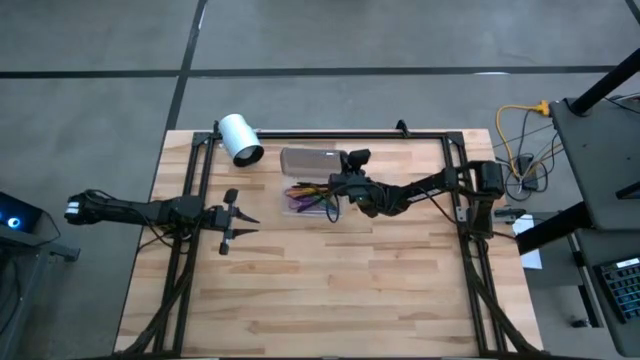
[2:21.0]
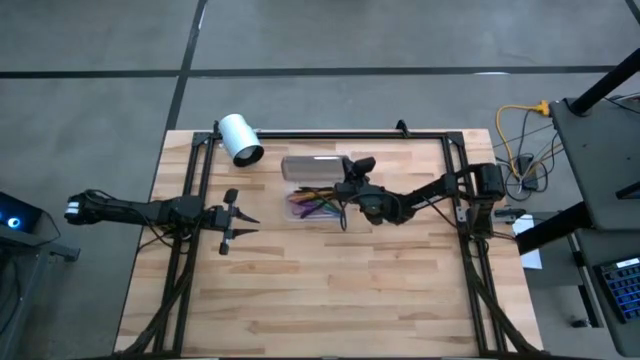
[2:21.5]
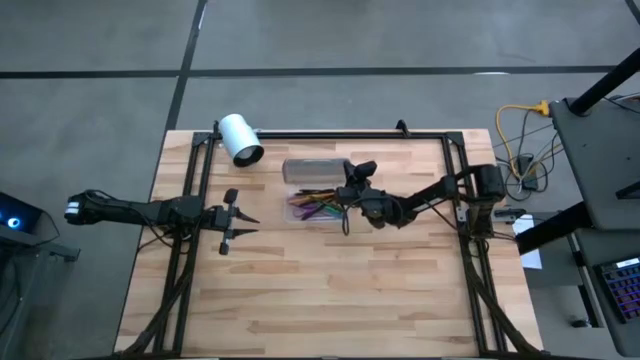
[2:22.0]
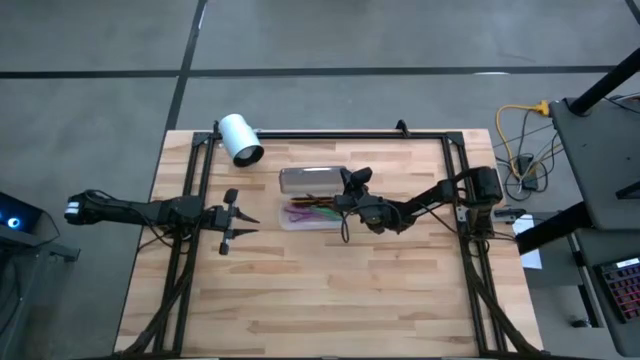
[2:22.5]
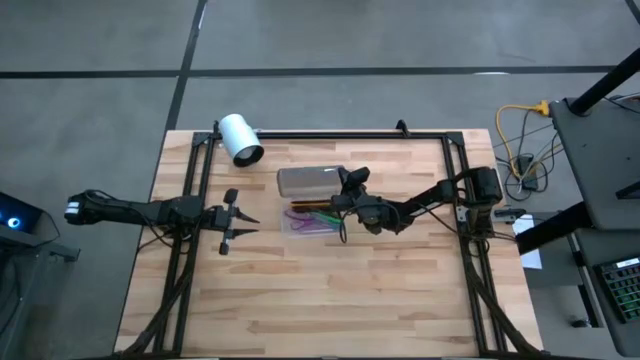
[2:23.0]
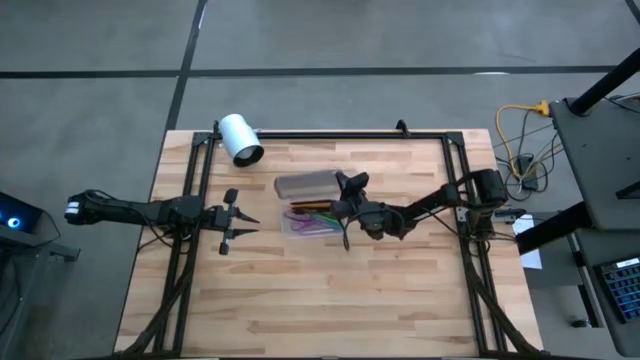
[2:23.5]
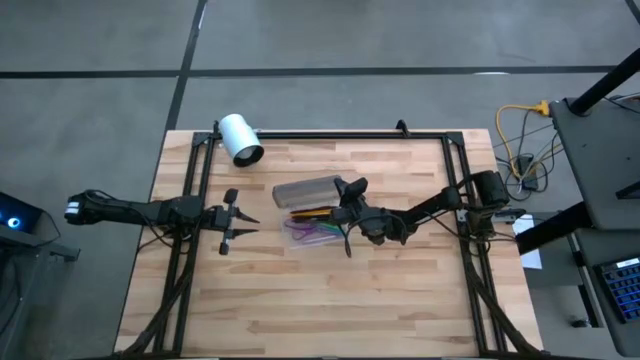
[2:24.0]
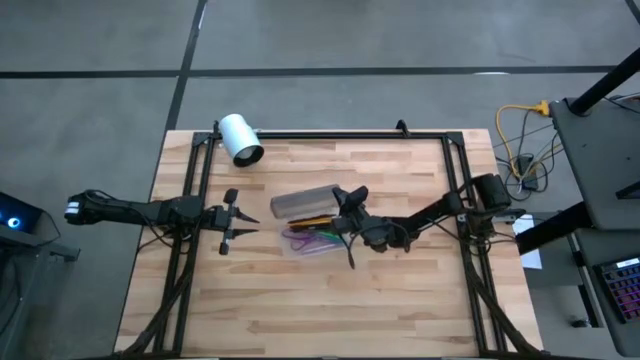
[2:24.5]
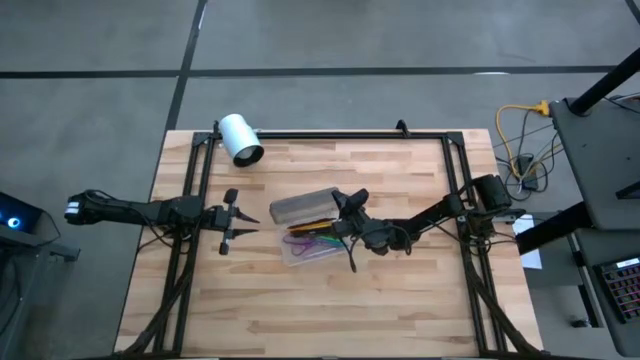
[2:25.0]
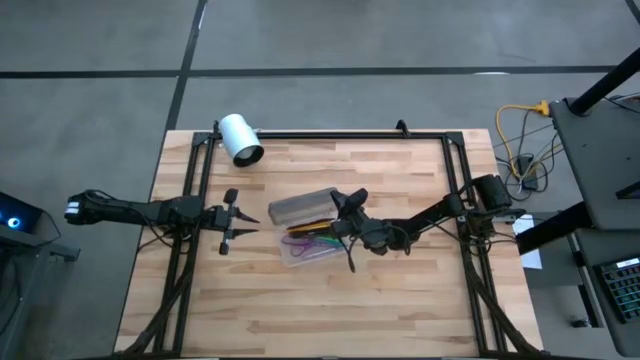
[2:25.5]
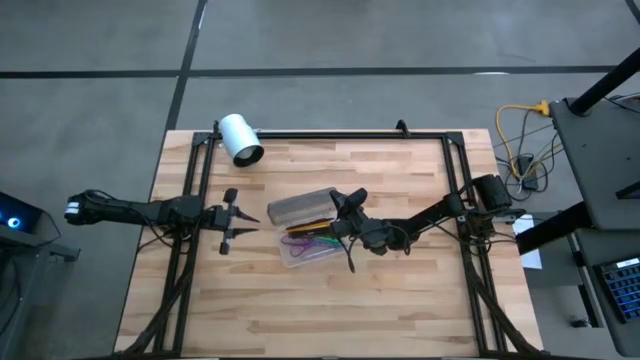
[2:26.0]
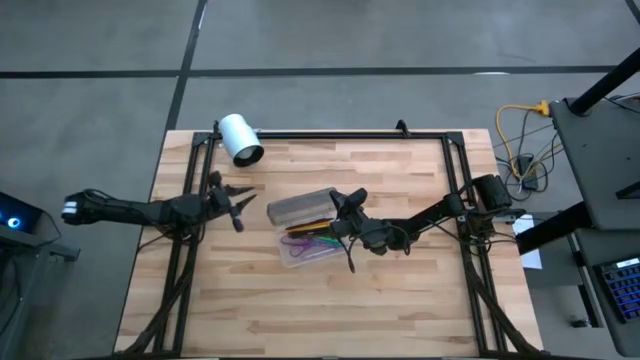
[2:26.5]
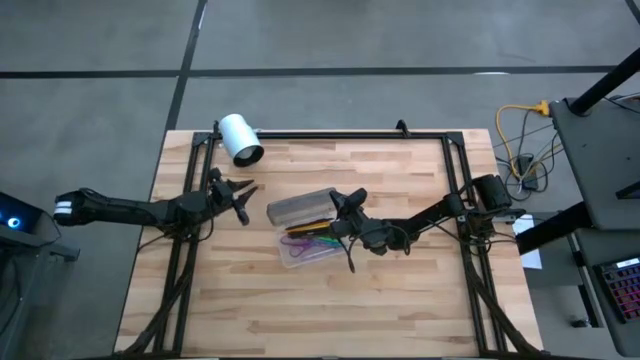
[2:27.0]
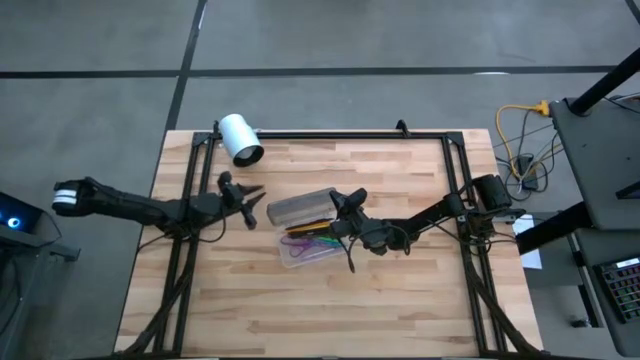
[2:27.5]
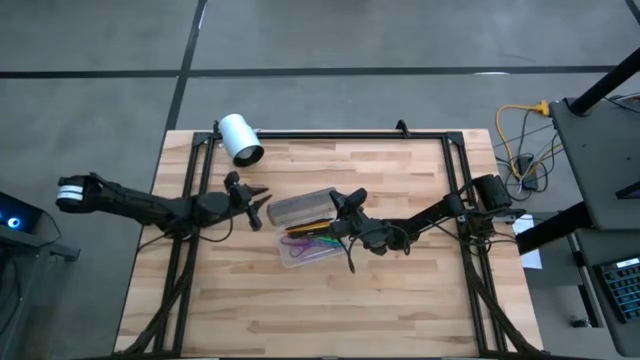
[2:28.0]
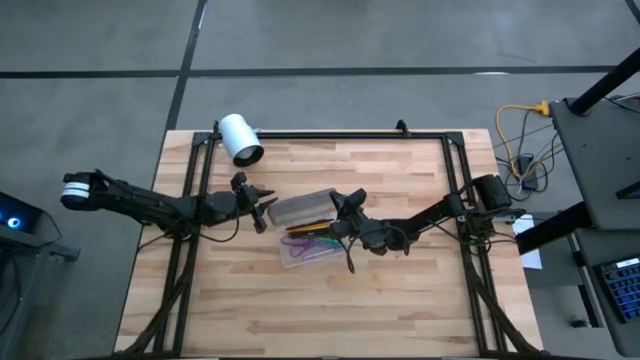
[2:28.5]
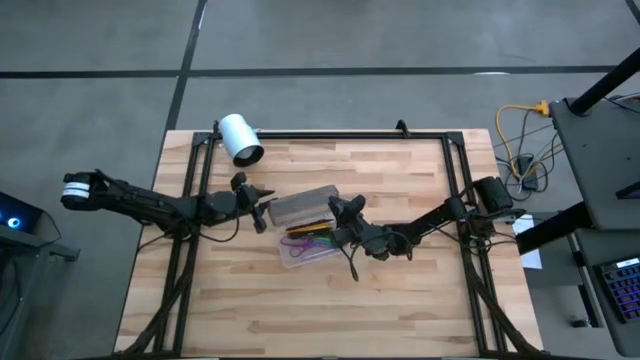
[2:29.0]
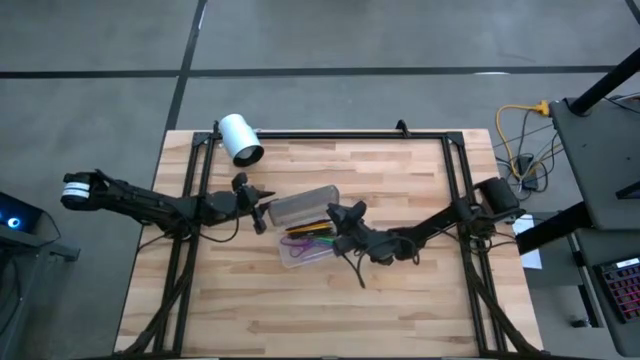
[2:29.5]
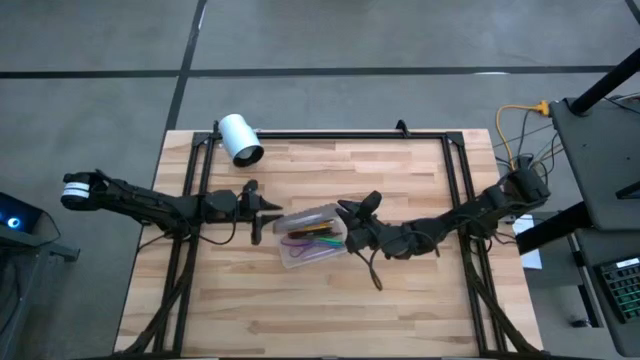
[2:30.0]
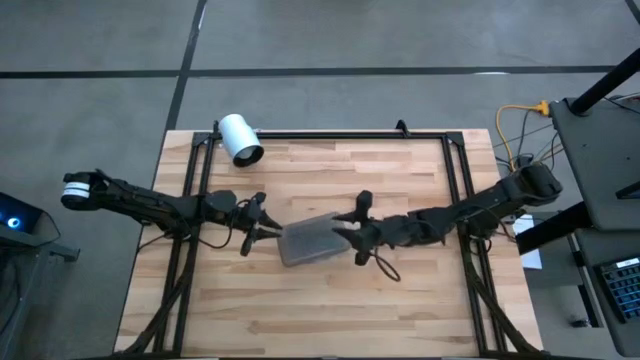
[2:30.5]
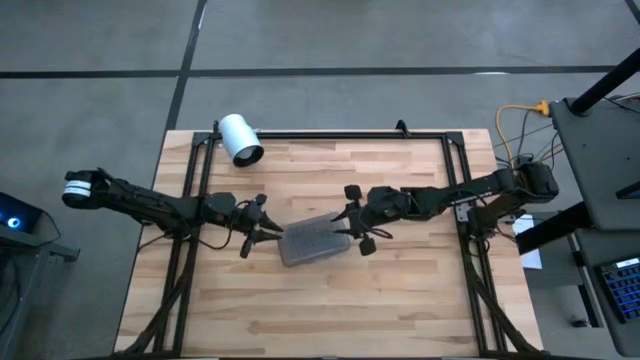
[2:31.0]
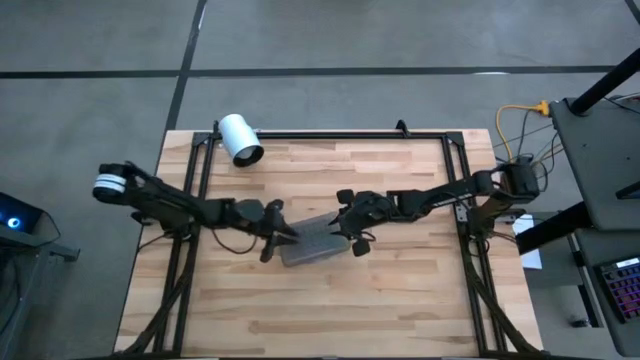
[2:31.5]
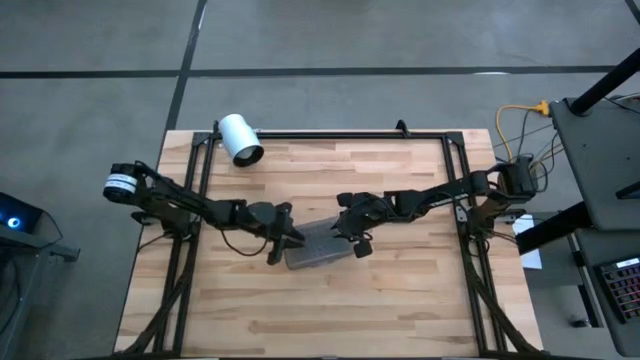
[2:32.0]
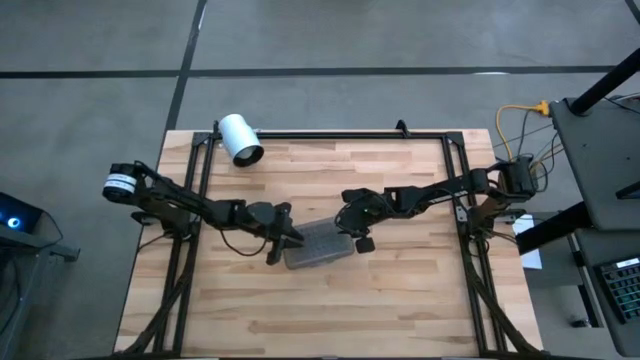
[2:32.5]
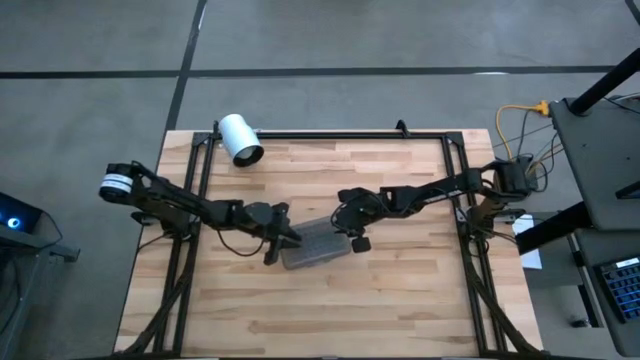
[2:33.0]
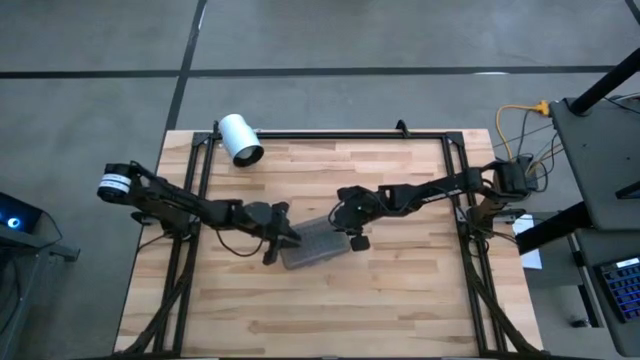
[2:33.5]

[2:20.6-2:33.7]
Task: Pick & place school supplies into a supply box
Close the supply box

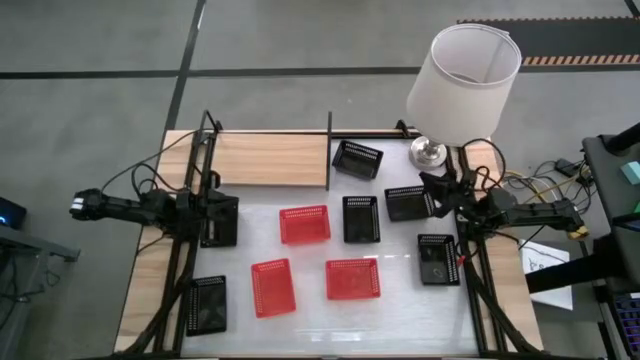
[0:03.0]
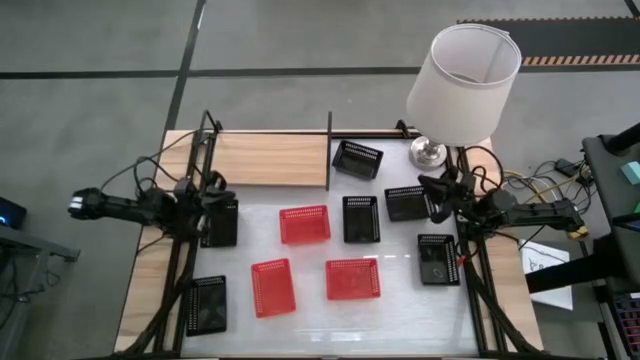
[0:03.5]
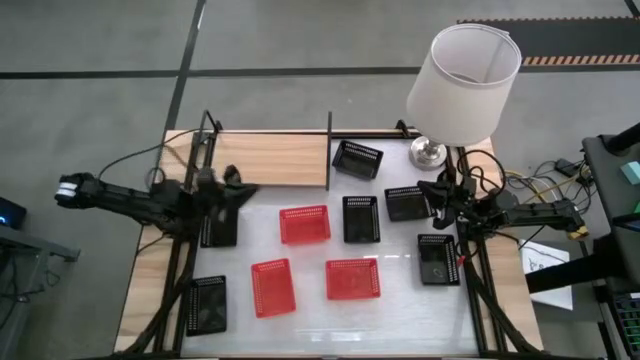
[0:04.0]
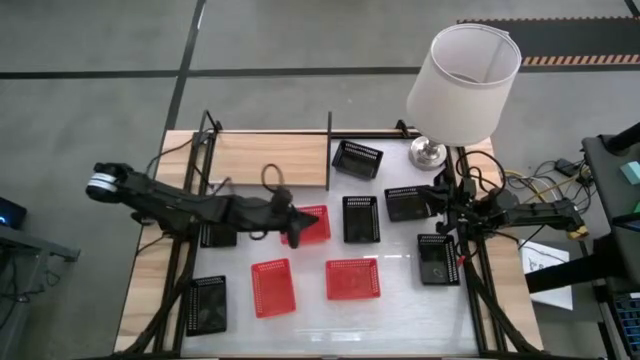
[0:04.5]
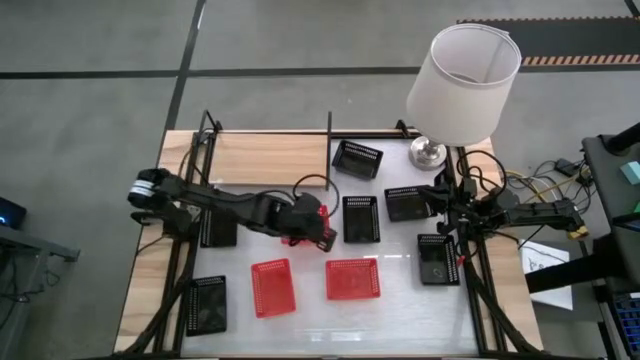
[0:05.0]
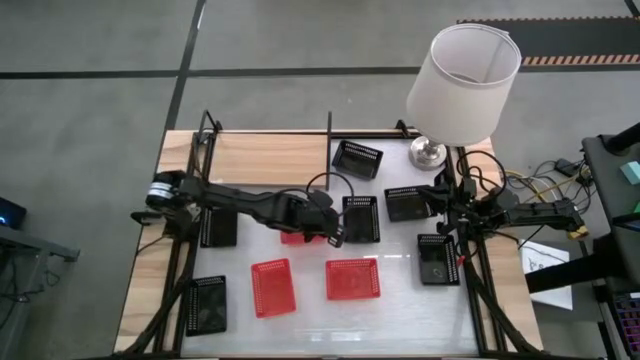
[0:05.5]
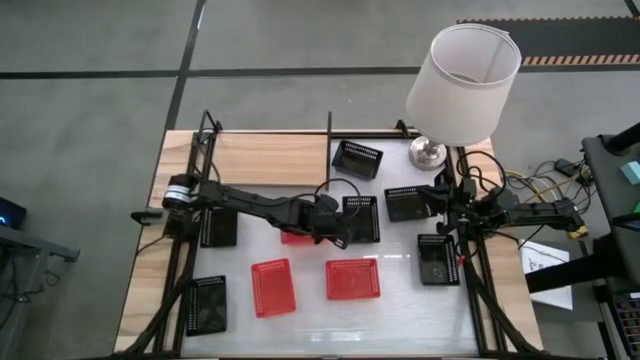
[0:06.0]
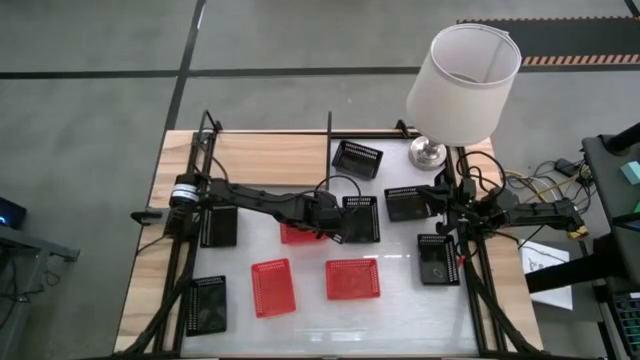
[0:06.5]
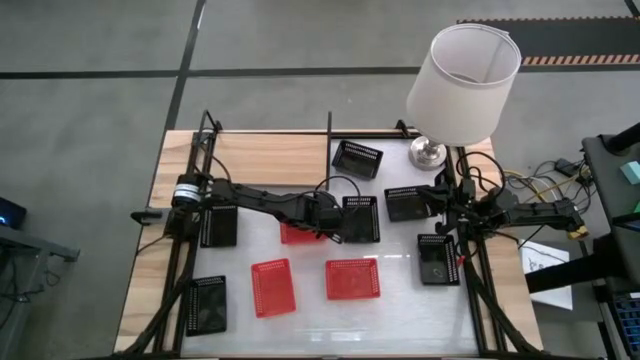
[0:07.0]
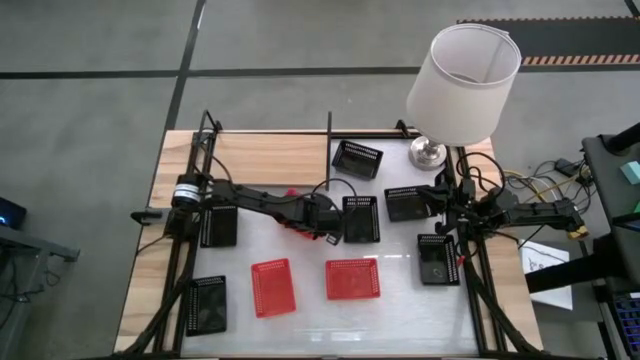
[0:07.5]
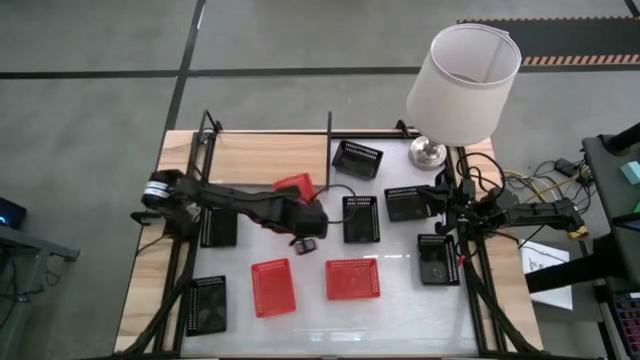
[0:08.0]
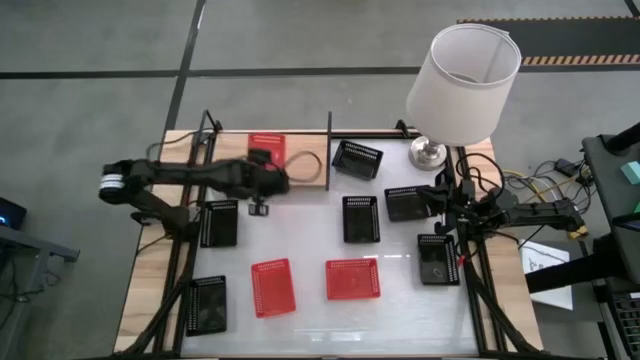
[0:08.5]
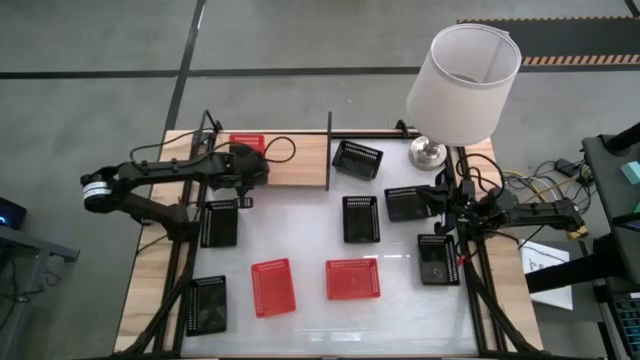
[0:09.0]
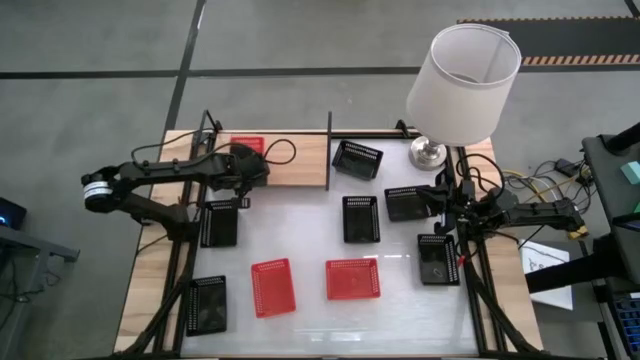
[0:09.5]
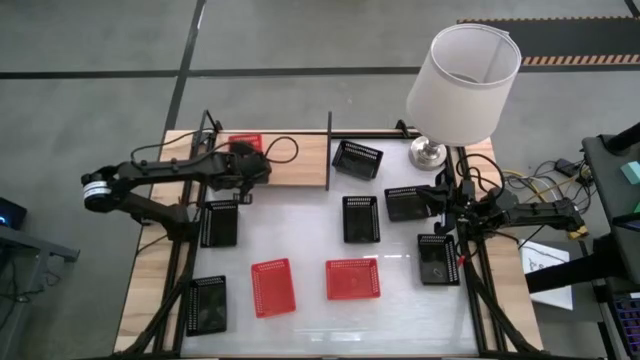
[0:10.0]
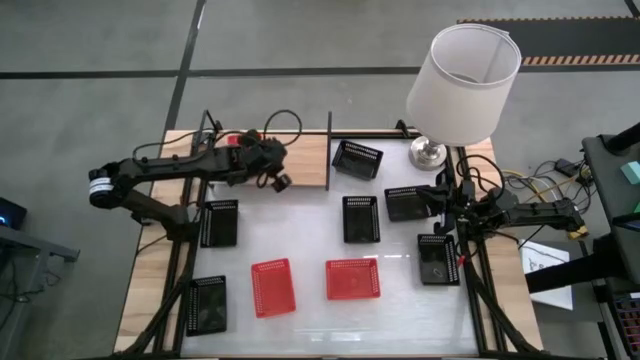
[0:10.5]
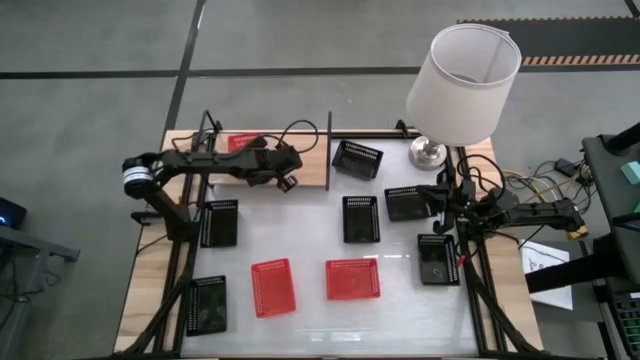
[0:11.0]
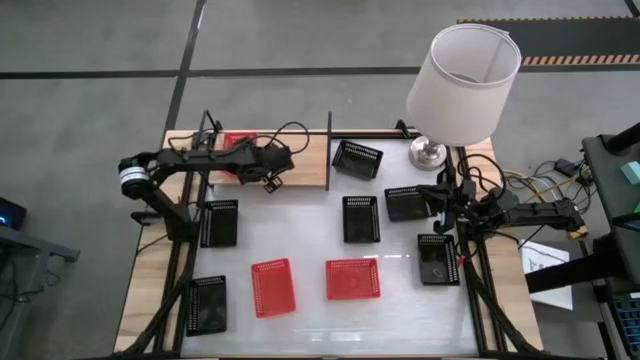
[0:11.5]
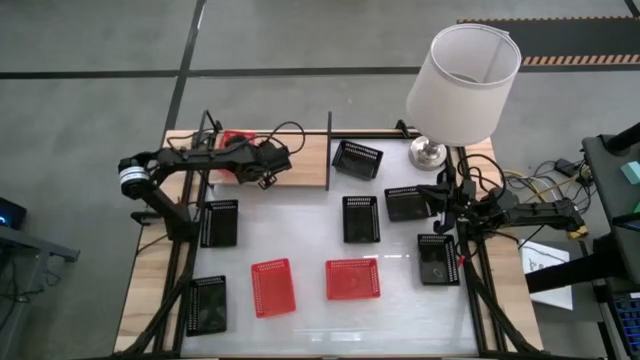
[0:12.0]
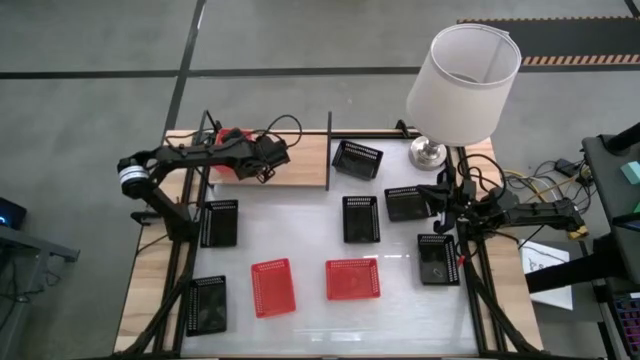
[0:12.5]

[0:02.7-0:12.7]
Task: Stack baskets on shelf by color
Put the red basket on the shelf
